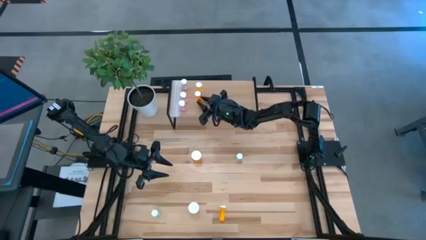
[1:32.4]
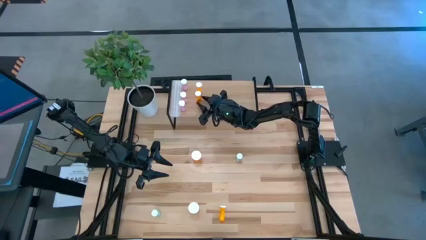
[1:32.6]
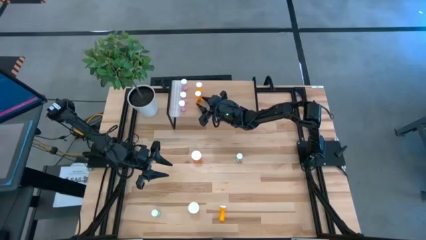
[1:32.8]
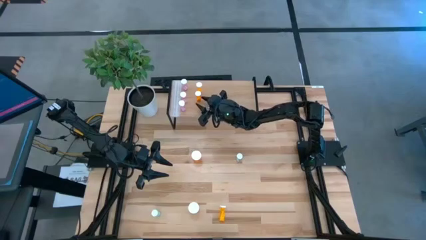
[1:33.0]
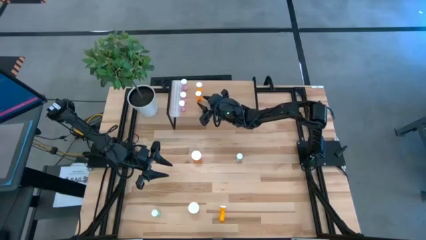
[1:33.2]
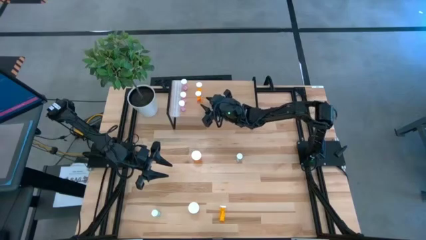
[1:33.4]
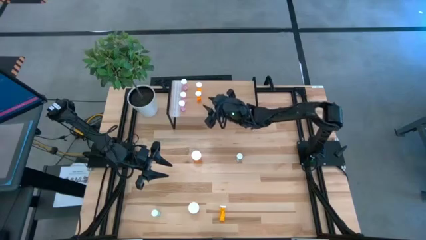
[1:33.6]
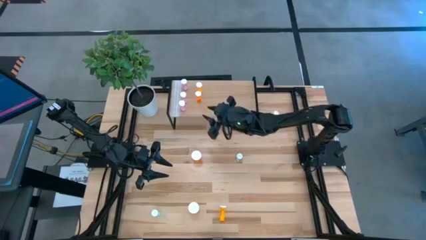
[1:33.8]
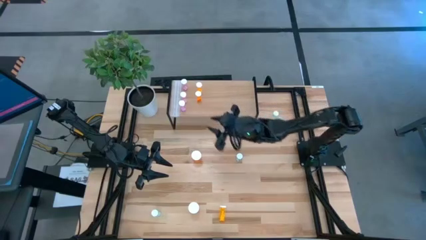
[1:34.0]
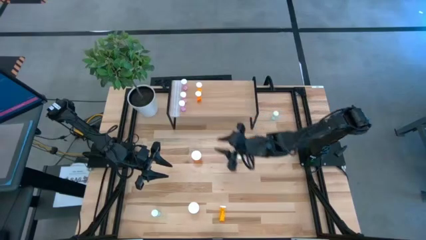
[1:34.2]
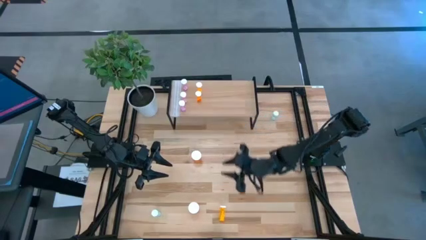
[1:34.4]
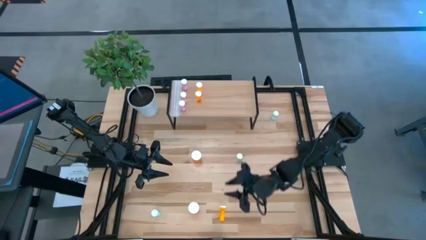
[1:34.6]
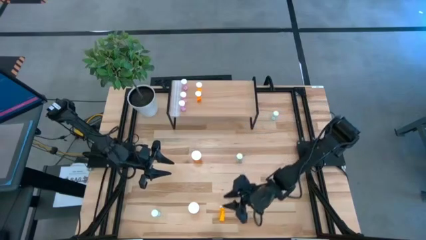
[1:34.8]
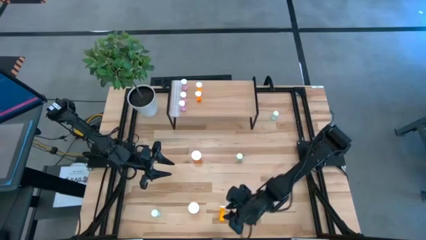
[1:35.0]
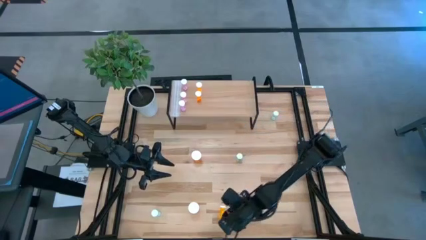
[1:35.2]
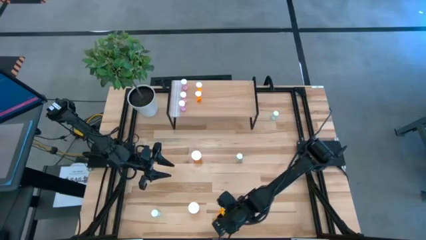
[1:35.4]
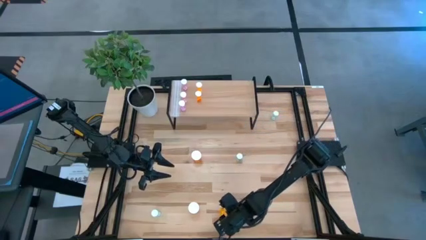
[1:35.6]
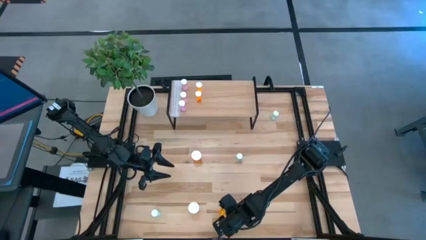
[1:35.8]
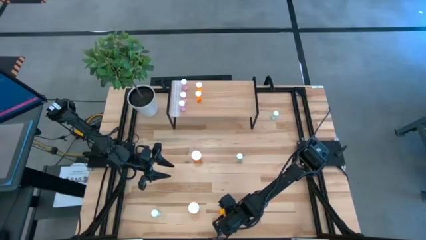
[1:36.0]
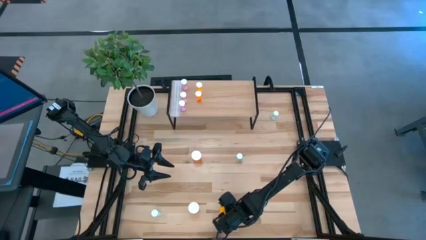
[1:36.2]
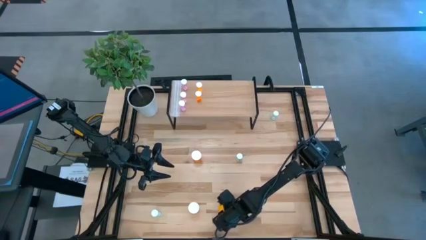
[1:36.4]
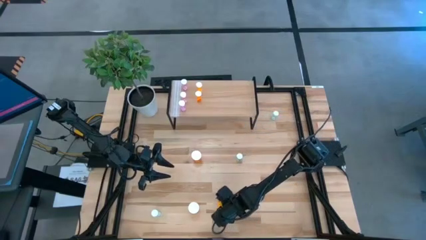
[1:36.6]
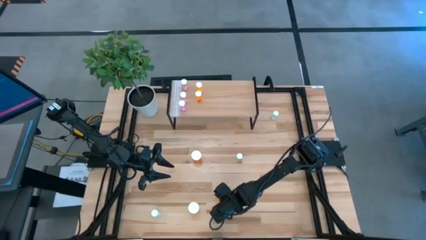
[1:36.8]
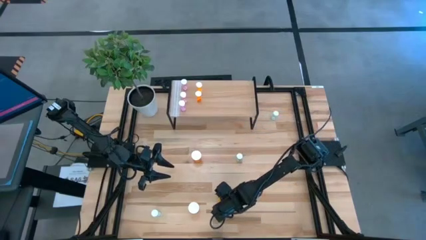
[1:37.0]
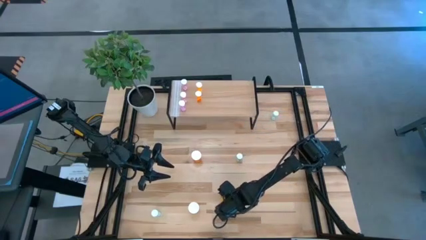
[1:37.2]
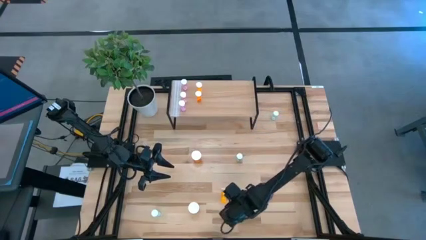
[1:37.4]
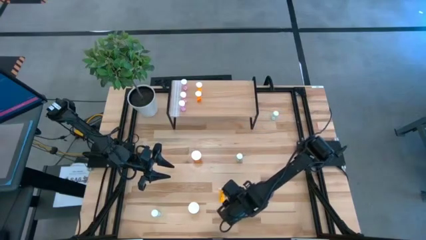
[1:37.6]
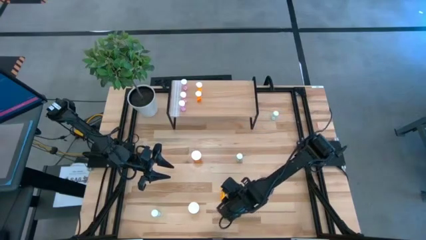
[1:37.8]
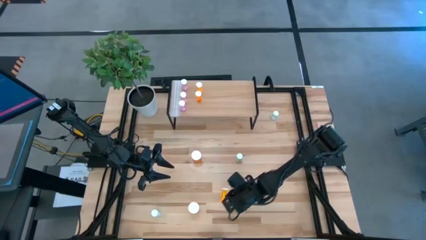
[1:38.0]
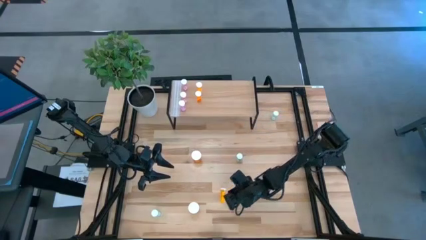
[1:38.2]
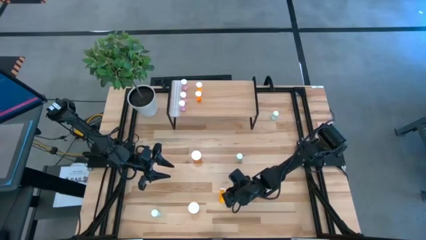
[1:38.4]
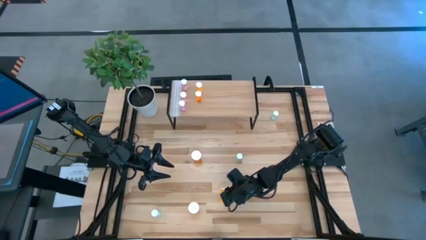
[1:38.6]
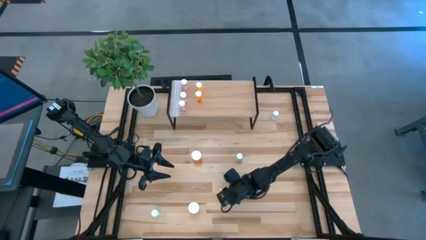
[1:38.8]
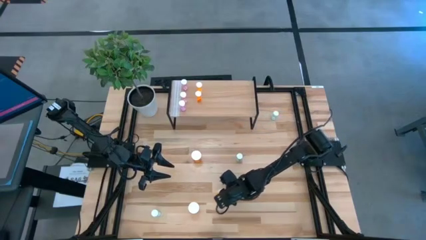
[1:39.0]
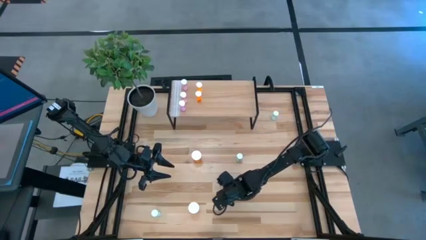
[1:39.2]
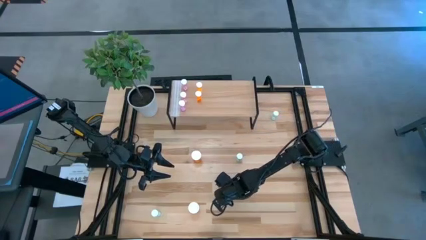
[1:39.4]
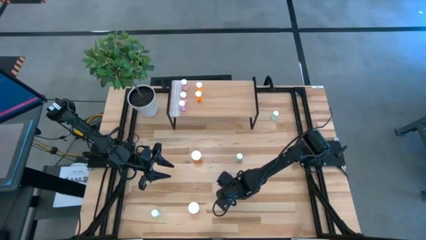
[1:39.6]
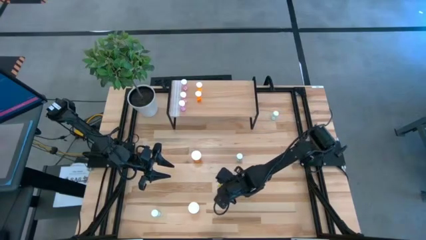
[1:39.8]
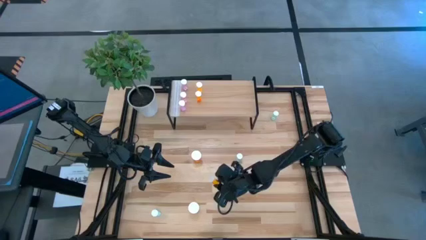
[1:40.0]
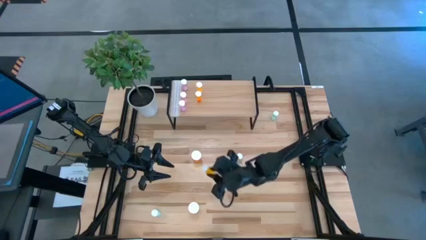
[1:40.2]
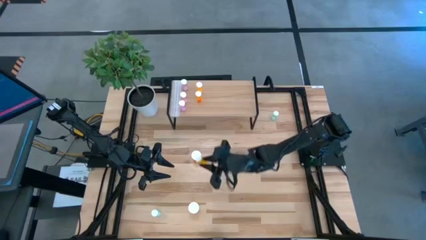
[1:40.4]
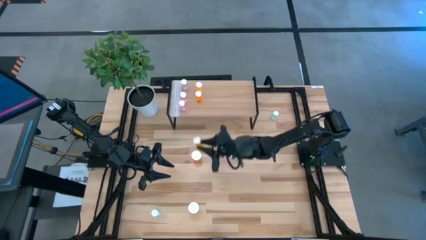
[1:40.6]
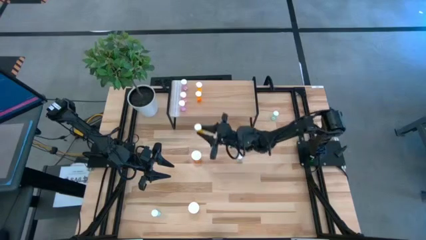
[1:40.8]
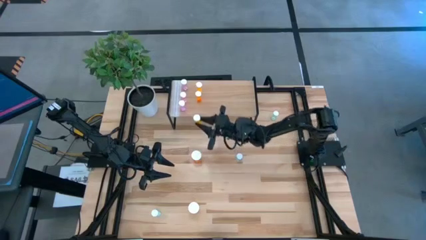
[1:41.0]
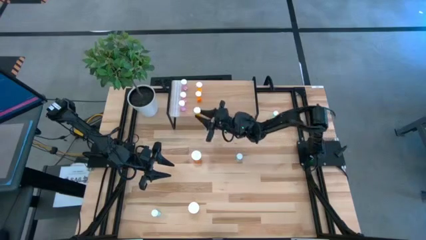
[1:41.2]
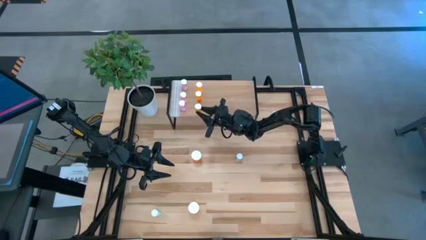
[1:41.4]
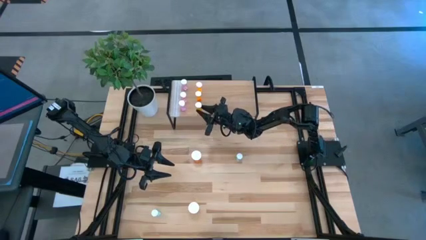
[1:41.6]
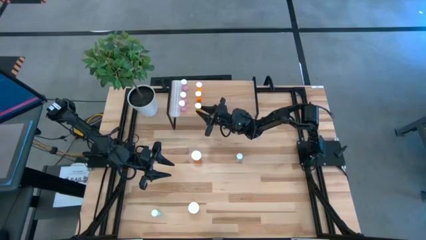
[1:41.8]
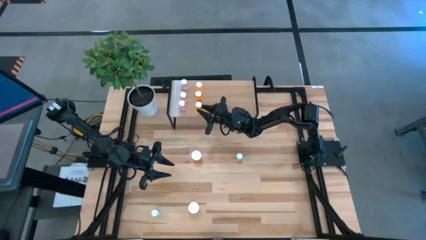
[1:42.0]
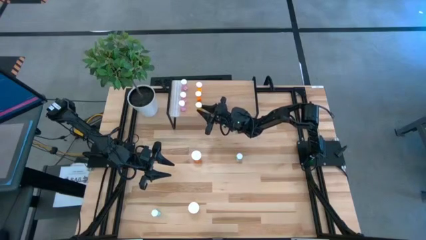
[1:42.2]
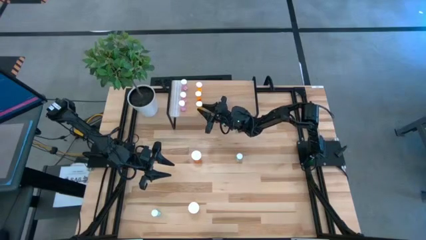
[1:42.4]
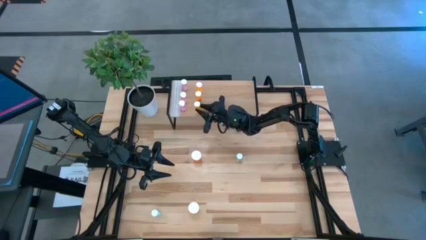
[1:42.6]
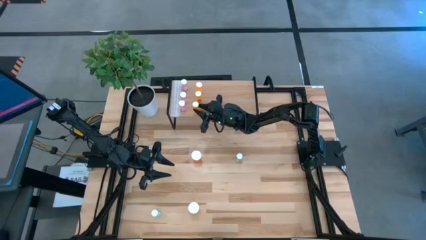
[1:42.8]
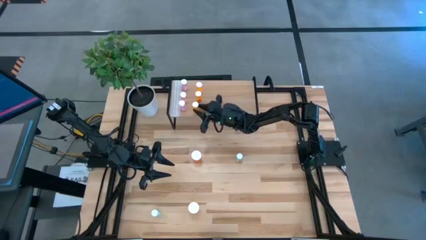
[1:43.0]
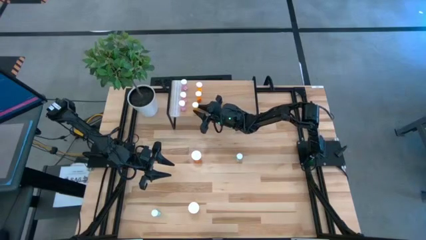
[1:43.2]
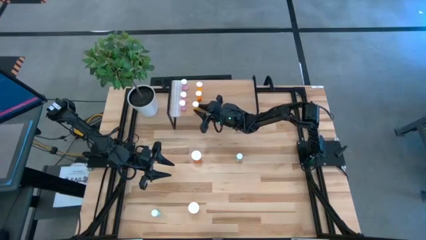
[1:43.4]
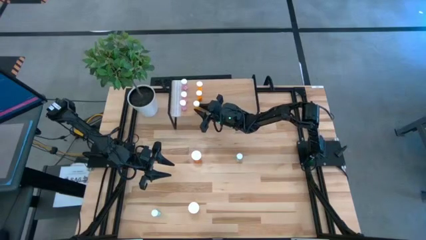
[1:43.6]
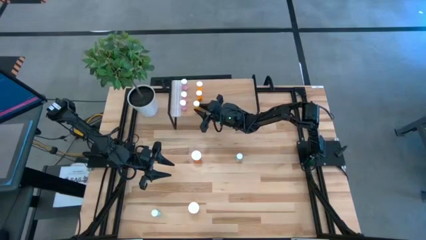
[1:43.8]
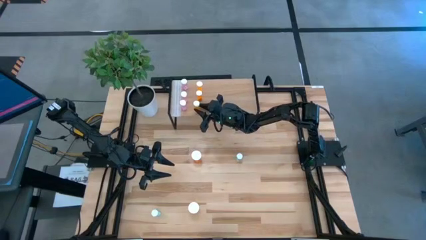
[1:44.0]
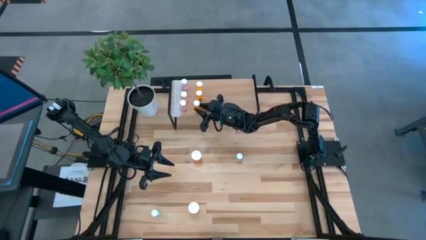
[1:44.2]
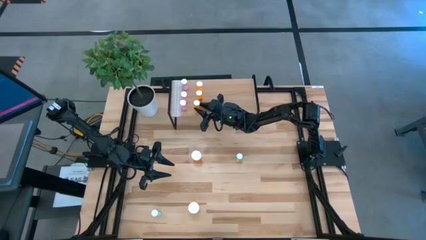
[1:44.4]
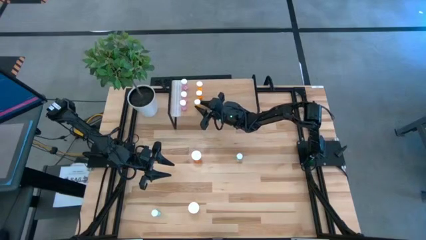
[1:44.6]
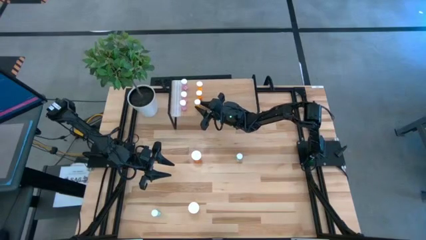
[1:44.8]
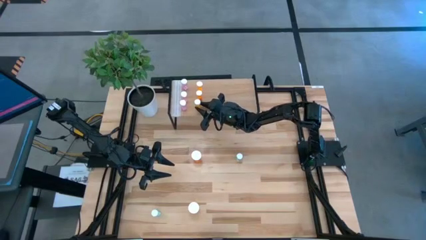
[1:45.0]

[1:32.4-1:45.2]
Task: Pick and place medicine bottles onto shelf by color
Put the small orange pill bottle on the shelf aligned with the other small orange pill bottles

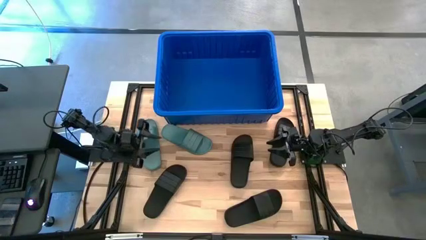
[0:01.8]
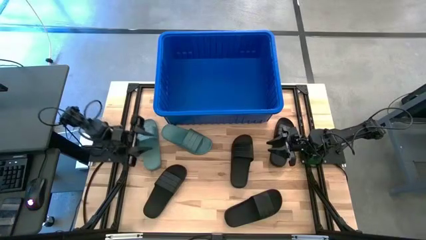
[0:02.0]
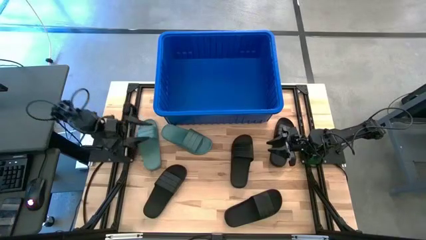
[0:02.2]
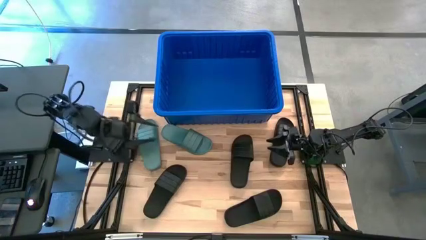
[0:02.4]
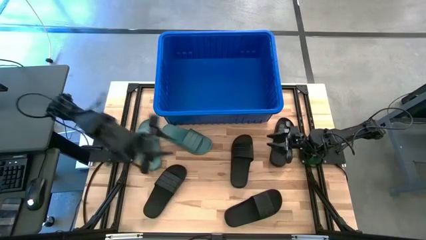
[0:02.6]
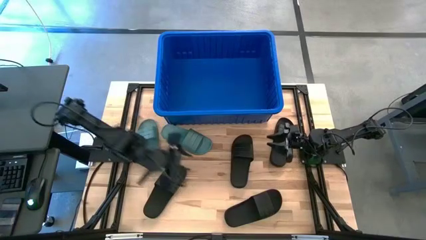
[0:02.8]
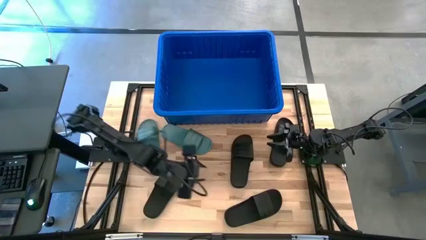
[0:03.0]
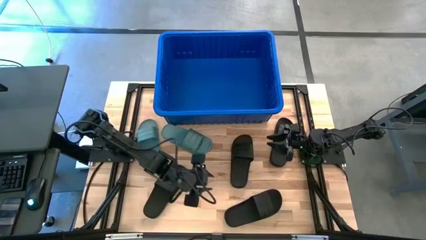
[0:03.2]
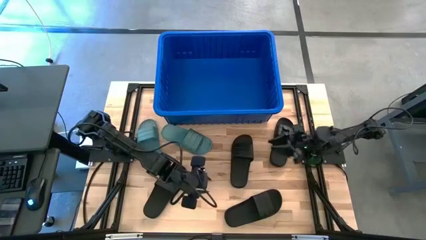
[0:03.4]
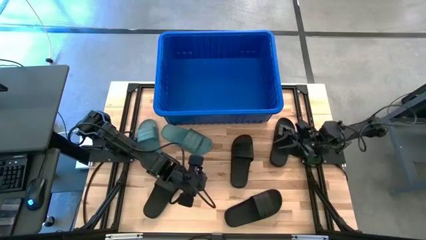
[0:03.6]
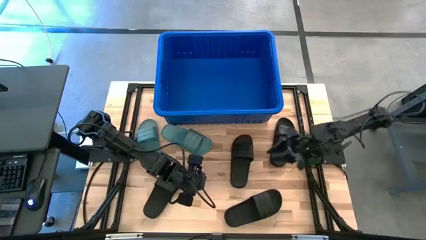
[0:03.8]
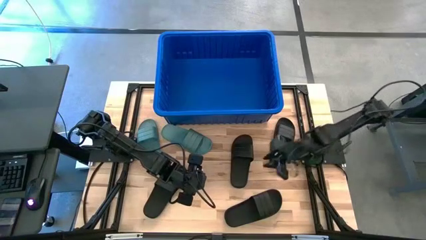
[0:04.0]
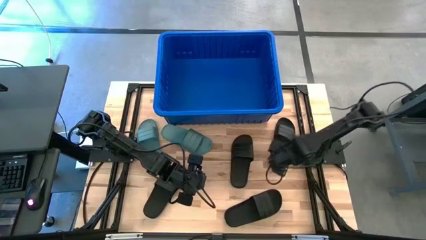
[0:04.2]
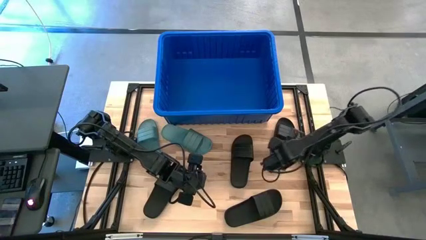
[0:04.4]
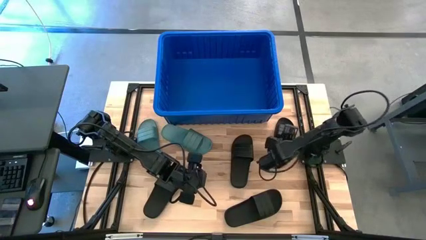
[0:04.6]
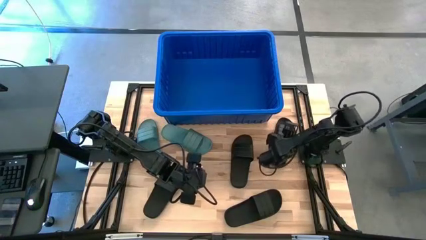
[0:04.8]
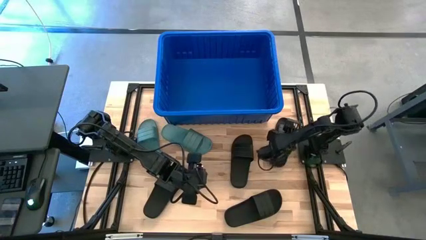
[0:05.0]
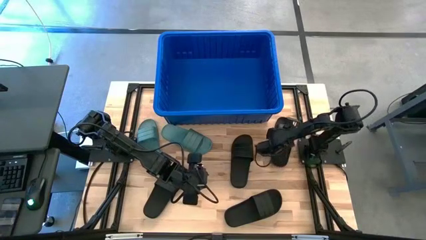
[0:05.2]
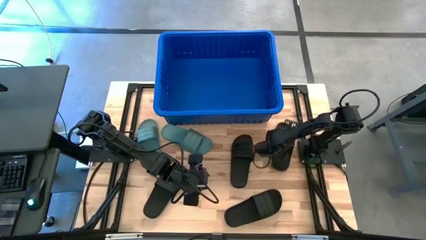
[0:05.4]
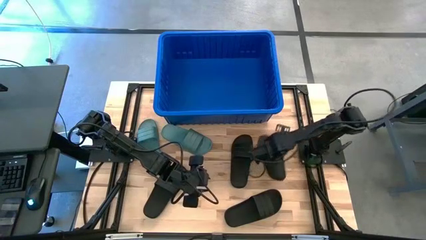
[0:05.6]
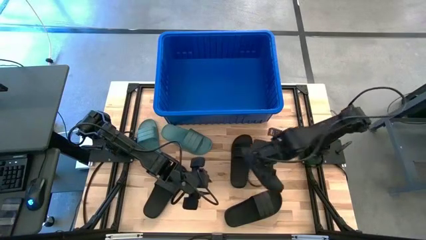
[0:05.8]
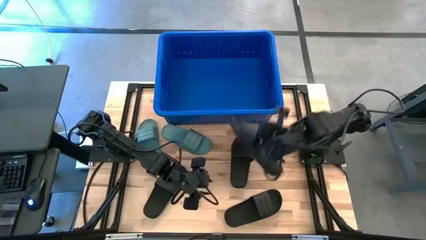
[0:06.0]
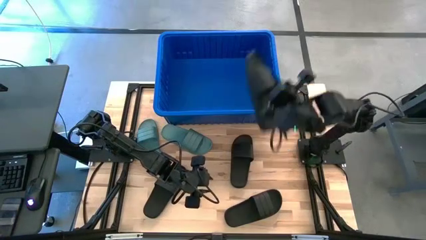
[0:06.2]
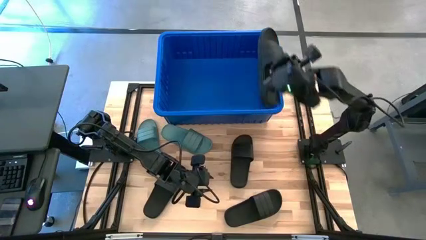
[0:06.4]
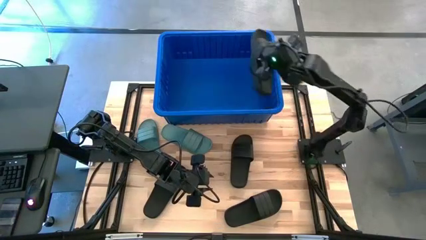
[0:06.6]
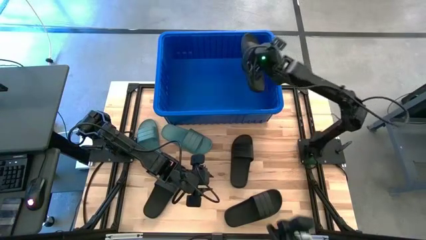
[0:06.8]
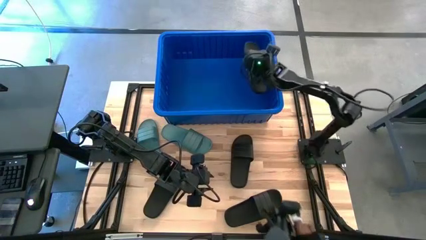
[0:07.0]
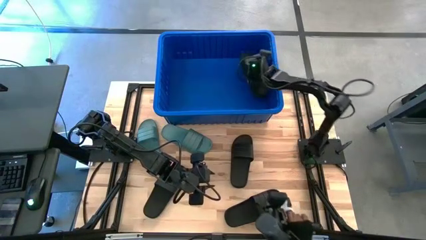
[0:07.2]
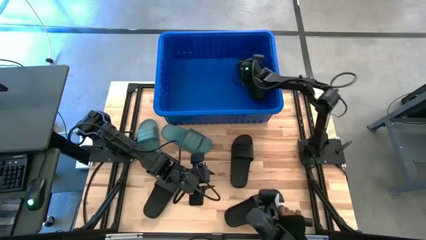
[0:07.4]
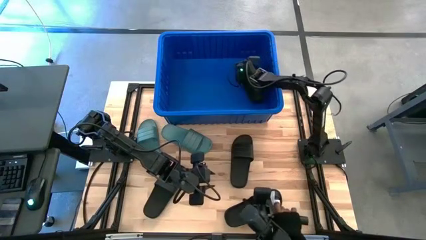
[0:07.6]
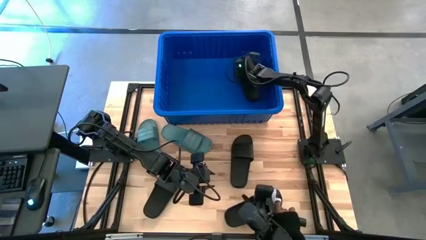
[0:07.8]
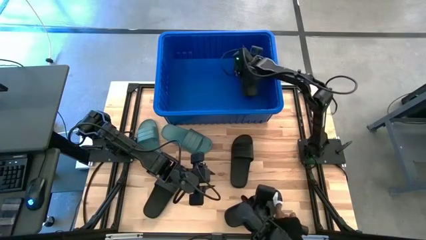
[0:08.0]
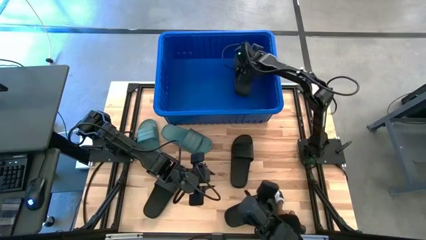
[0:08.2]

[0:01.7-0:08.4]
Task: Pick and place slides into bin
Put the black slide into the blue bin
